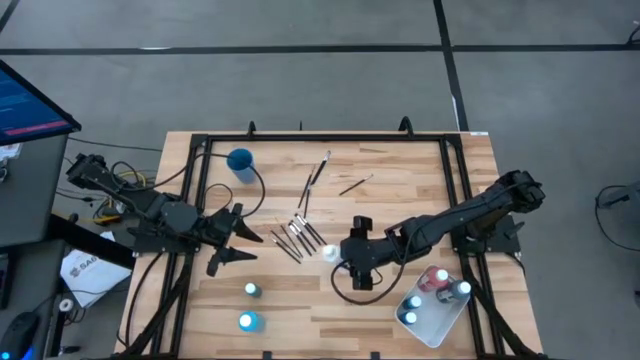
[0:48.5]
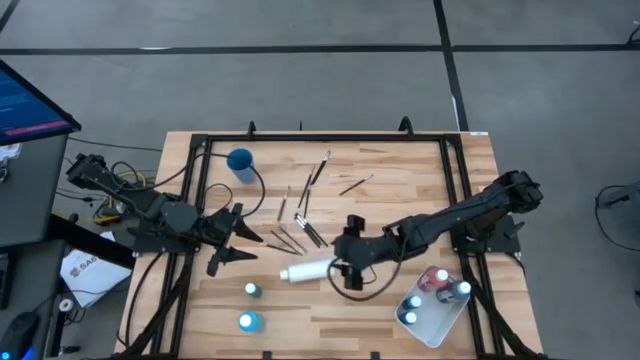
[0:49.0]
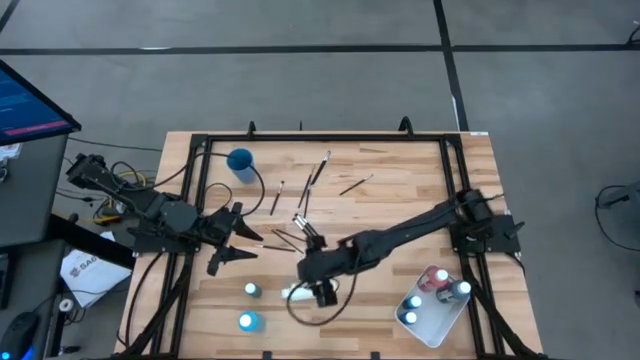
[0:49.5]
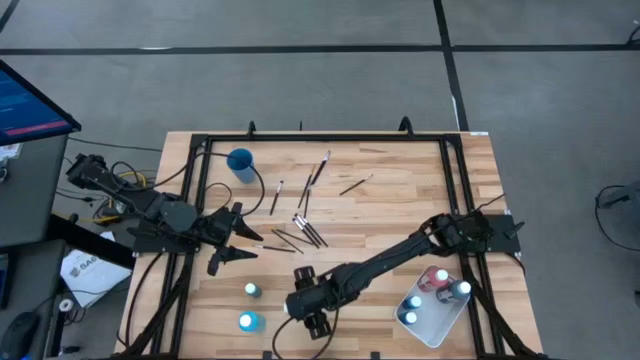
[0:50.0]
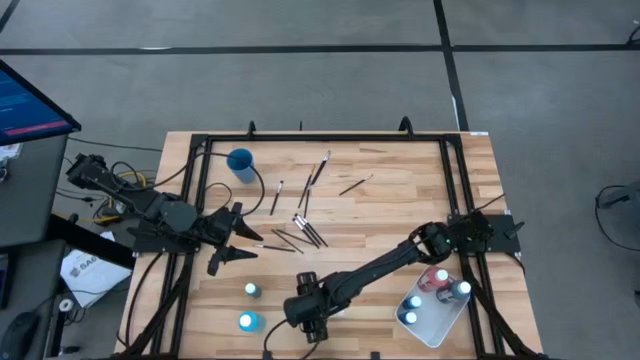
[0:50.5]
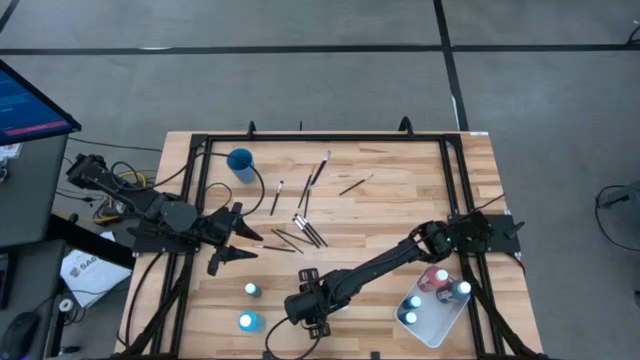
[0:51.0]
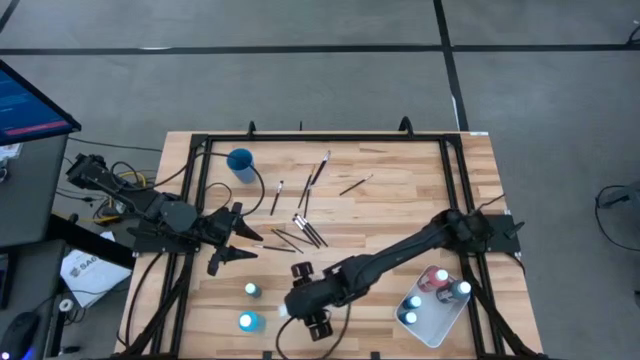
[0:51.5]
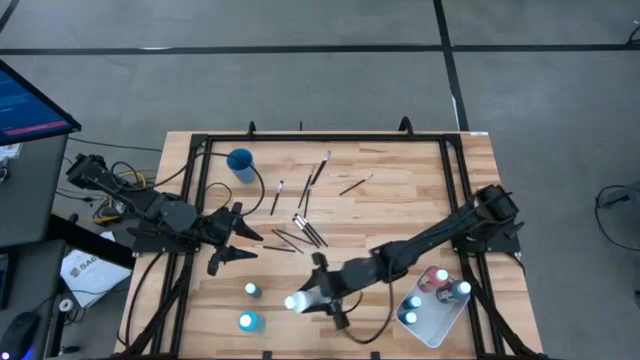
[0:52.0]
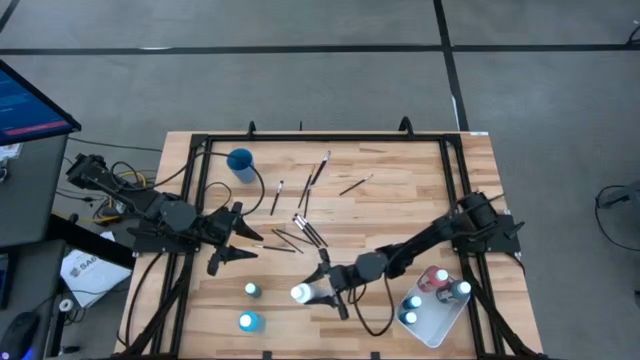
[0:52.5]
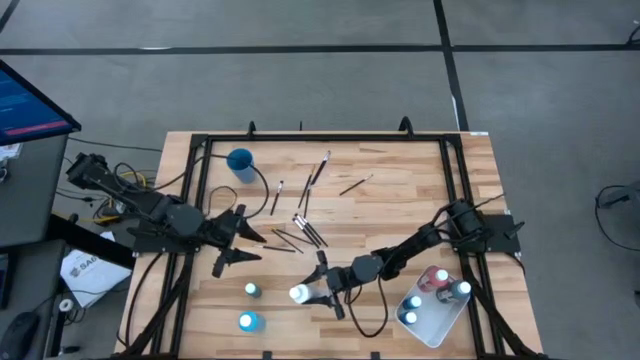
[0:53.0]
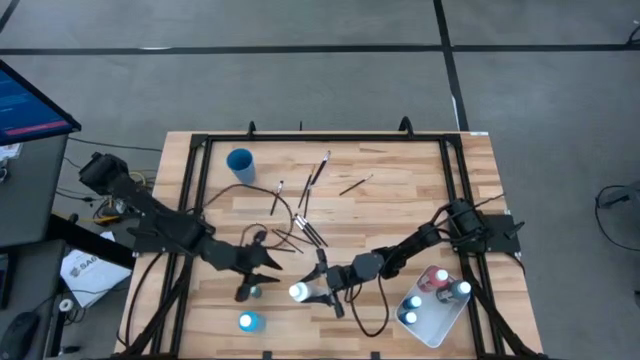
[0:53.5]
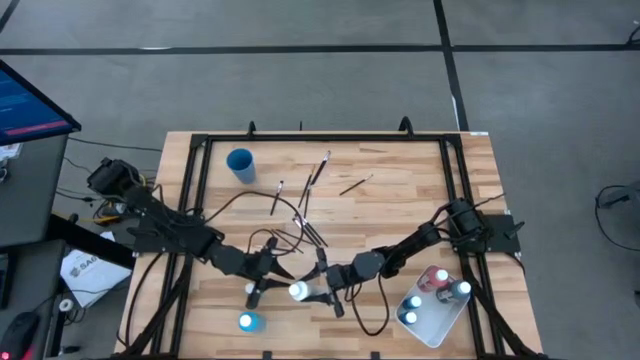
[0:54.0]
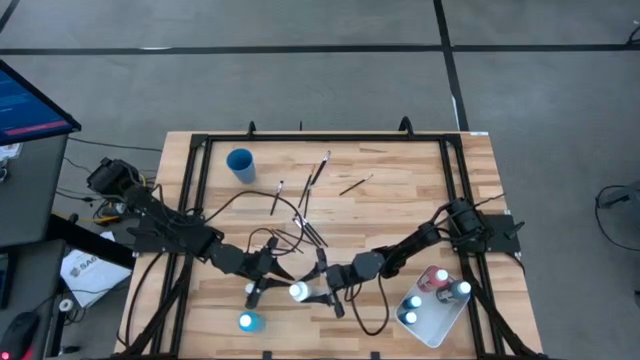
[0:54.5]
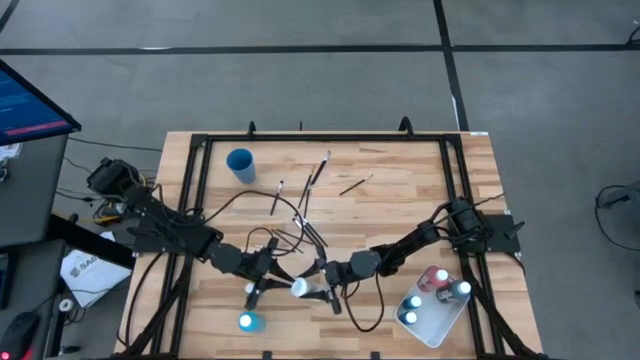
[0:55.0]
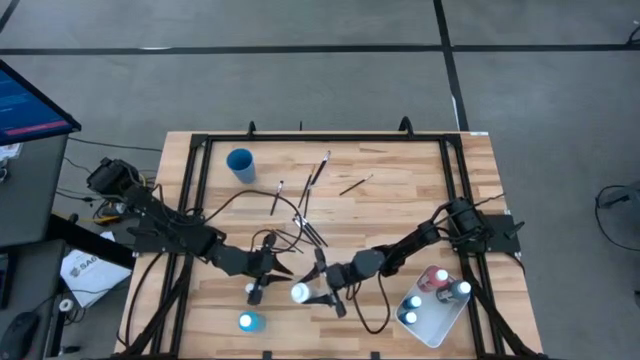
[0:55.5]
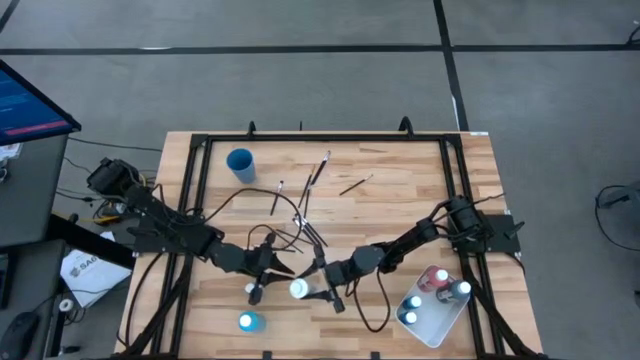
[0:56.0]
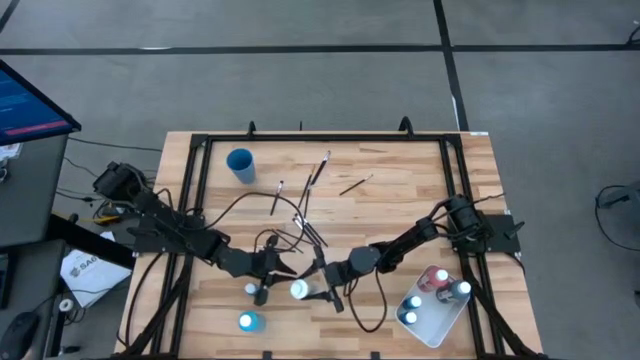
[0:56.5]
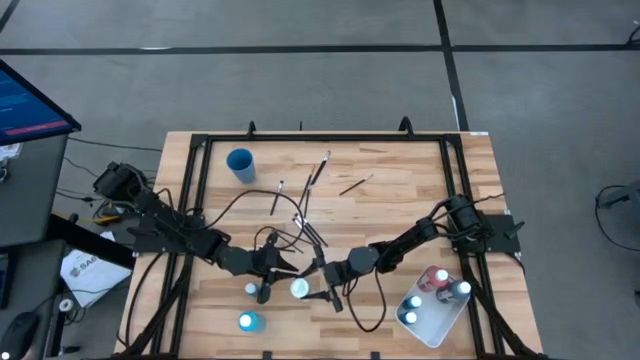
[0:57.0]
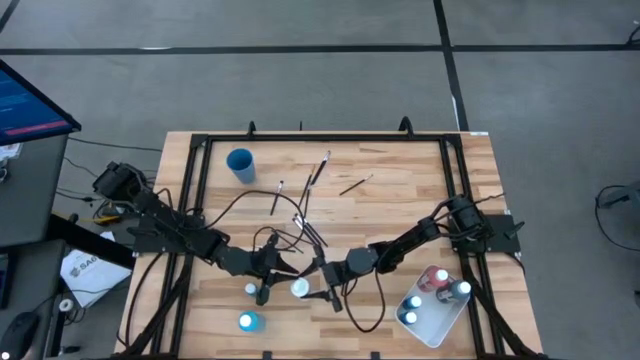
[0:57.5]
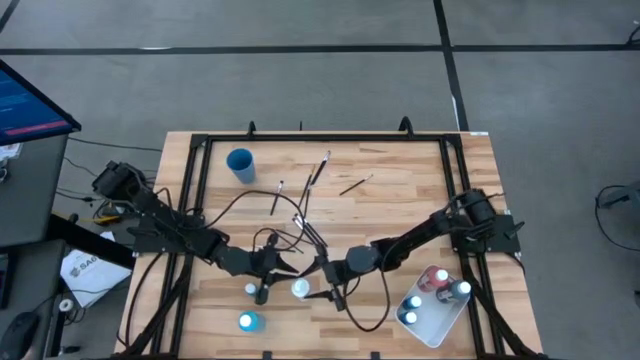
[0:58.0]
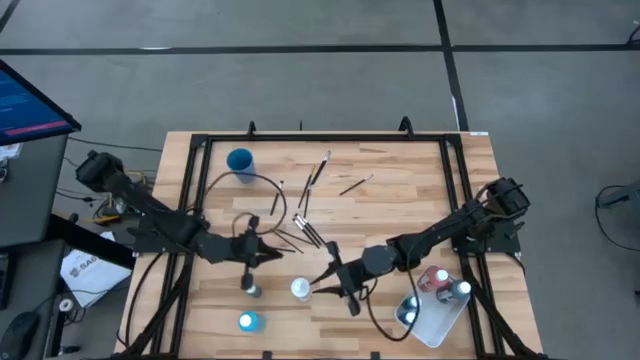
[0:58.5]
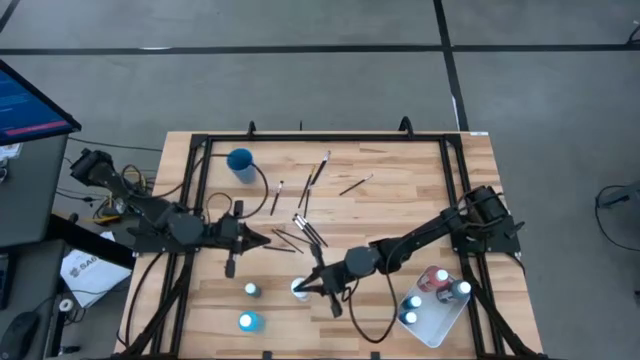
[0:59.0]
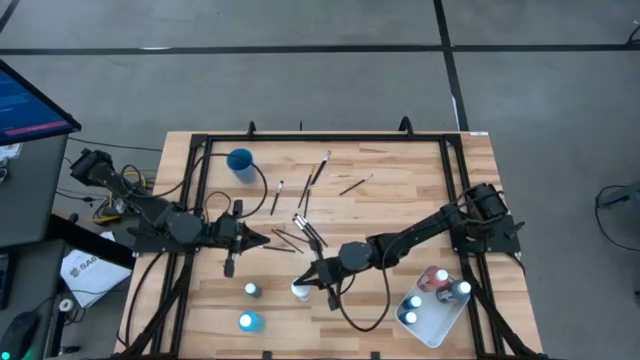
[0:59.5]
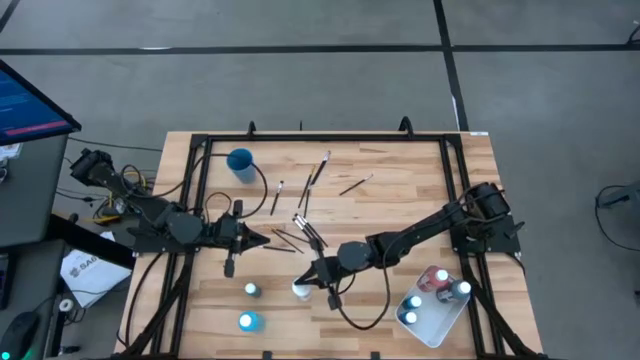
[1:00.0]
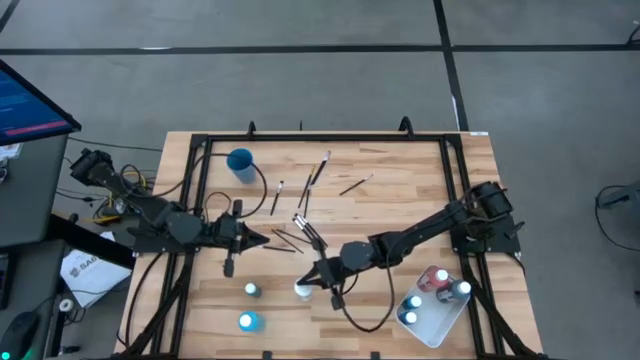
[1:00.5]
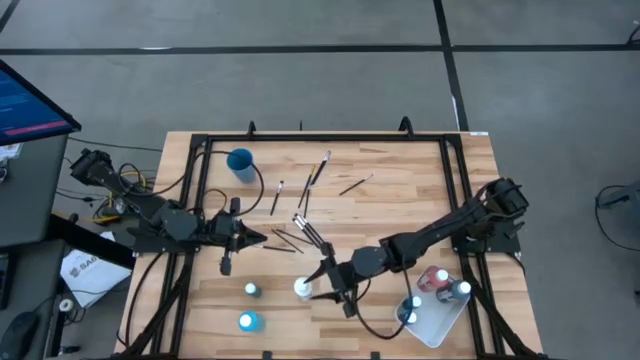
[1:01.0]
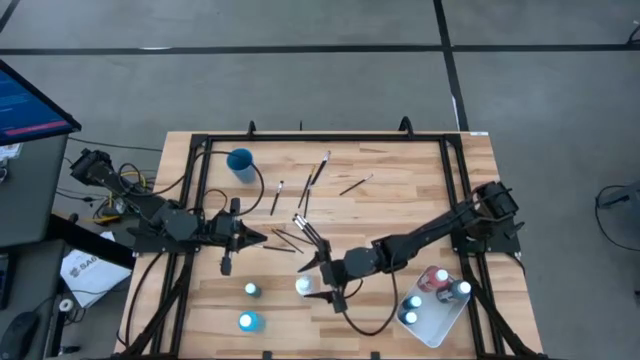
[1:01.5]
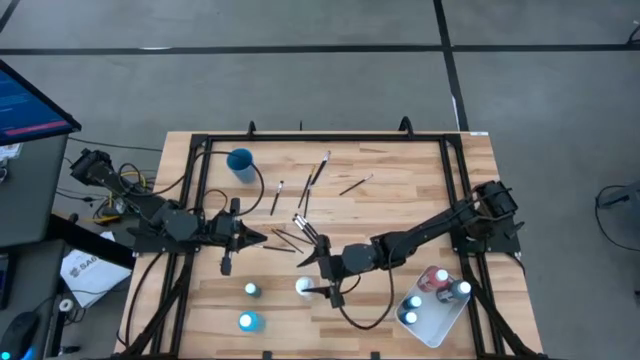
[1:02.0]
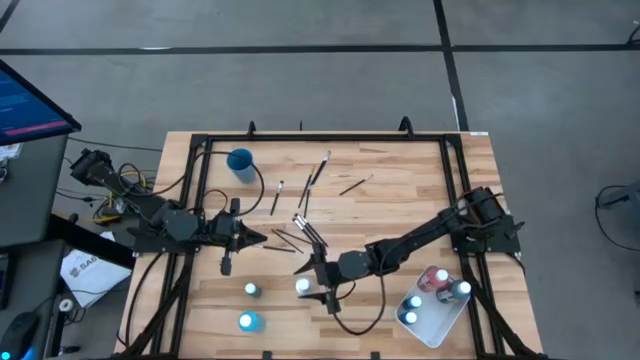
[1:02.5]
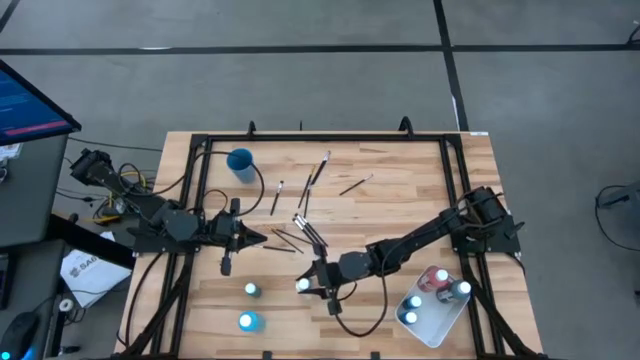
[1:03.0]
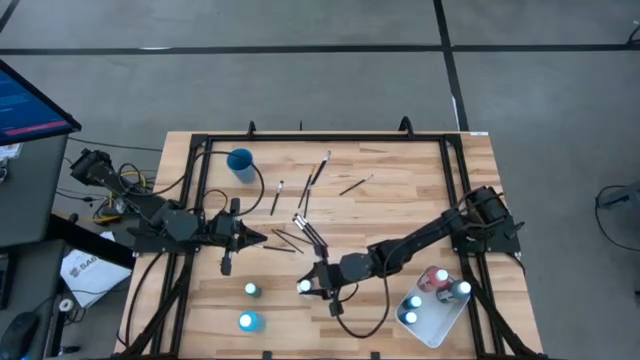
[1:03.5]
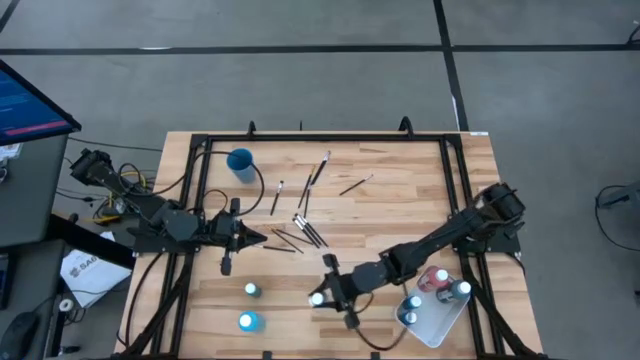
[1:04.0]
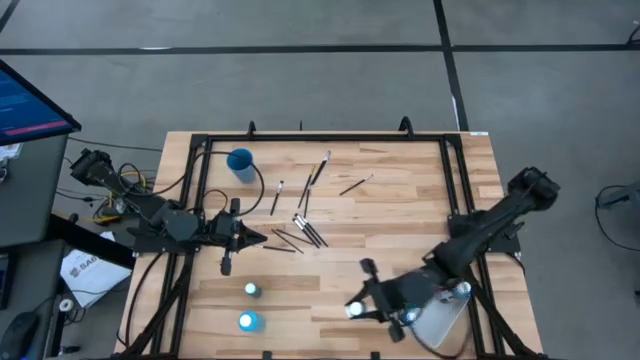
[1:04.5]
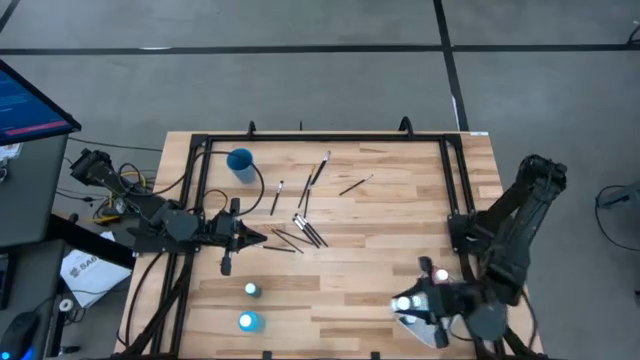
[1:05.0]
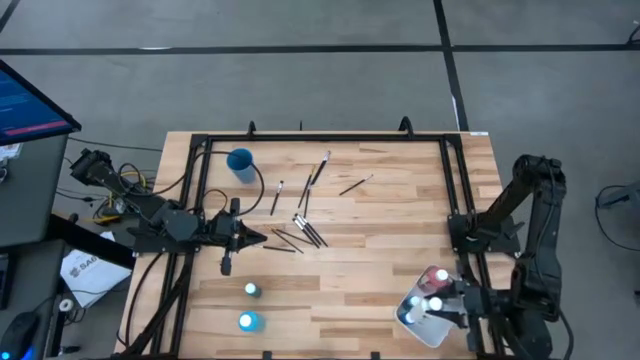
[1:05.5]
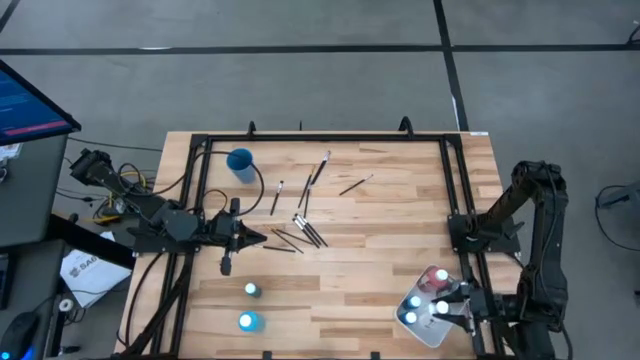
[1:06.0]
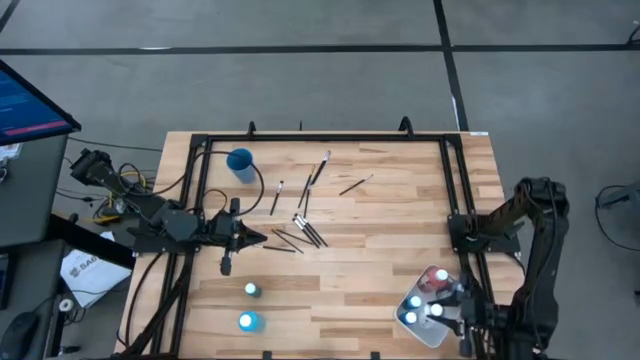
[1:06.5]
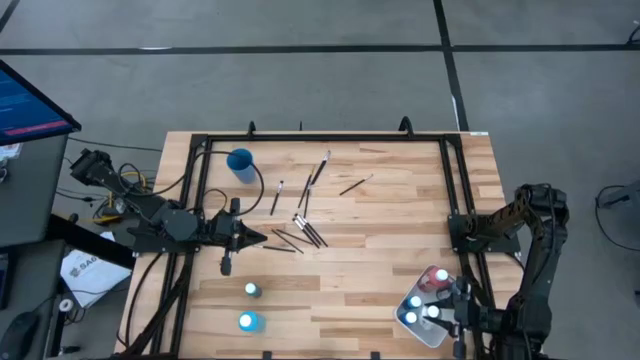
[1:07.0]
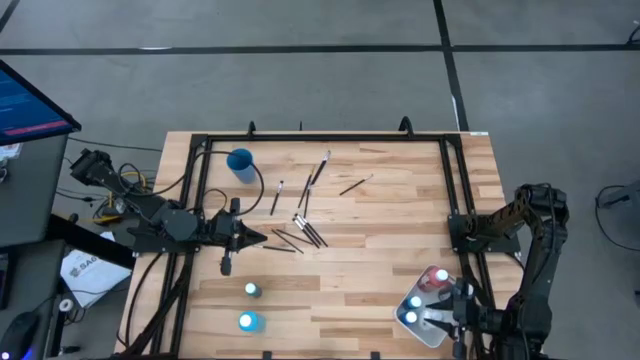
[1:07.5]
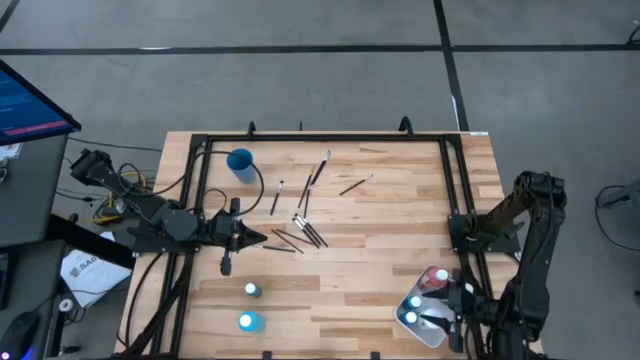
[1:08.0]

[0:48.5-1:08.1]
Task: Pick & Place Paint Supplies
Put the large white paint bottle into the white bin

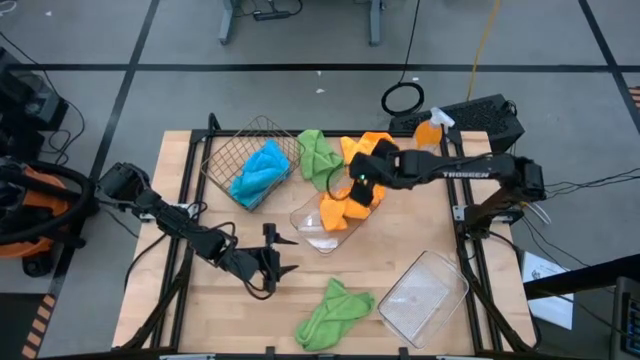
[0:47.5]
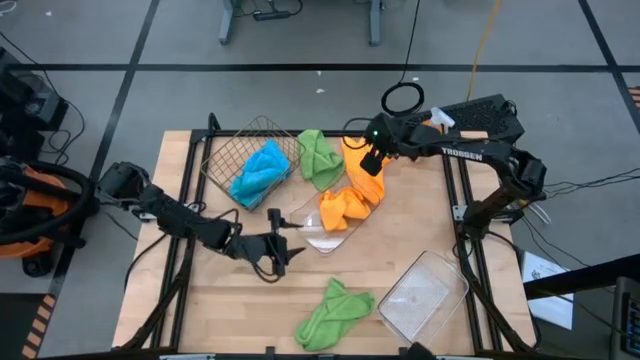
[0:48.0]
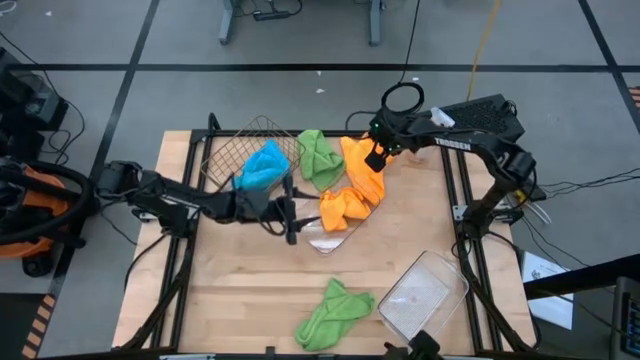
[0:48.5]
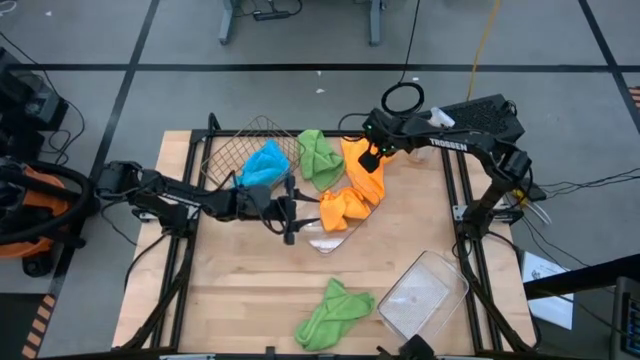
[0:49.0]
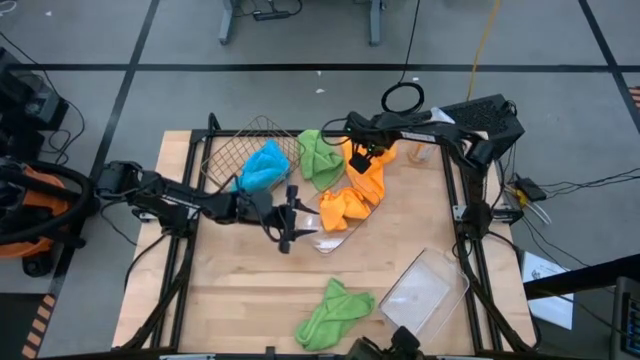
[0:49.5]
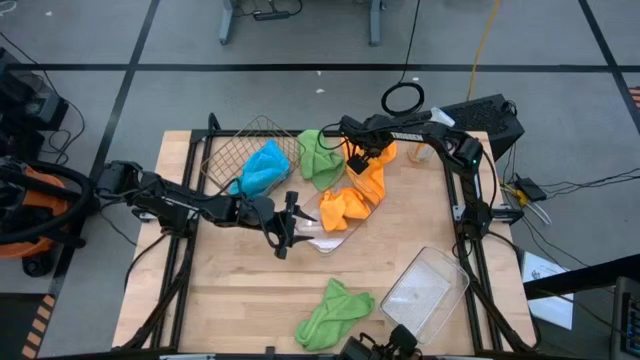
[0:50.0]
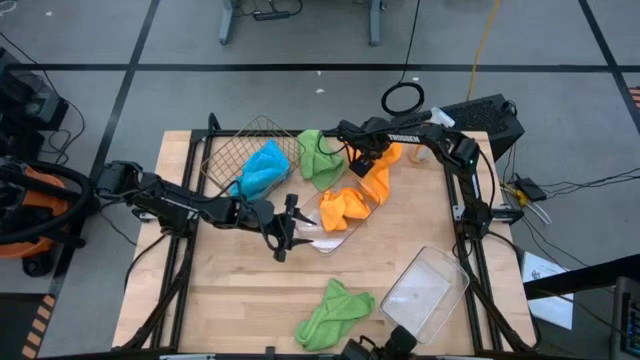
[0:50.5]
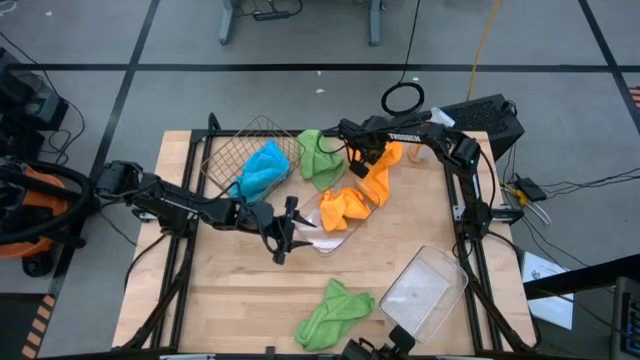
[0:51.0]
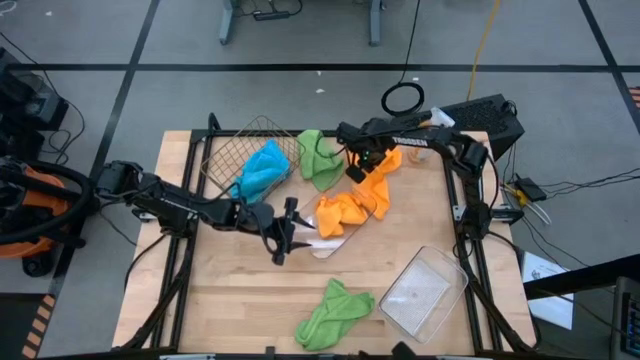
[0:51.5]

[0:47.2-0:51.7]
Task: Sort microfiber towel by color & place in baskets
Put the yellow towel into the top transparent bin
